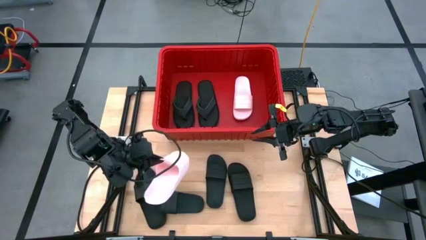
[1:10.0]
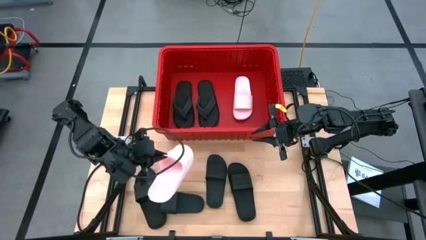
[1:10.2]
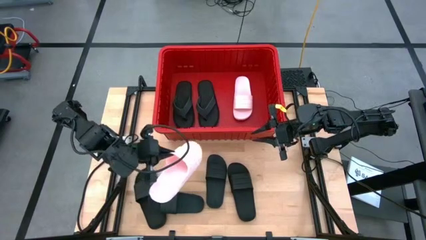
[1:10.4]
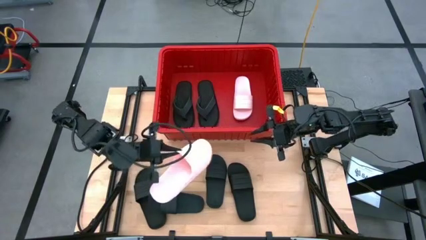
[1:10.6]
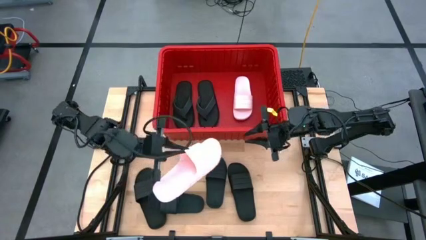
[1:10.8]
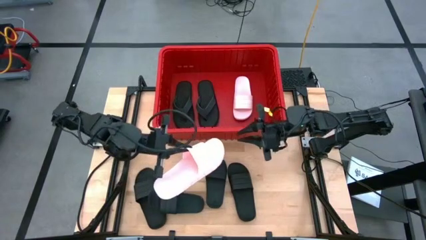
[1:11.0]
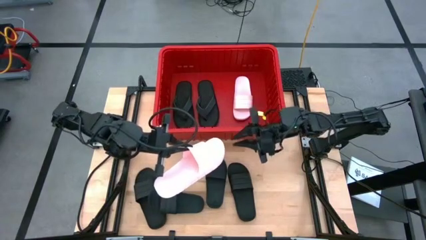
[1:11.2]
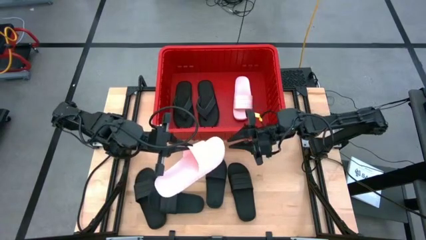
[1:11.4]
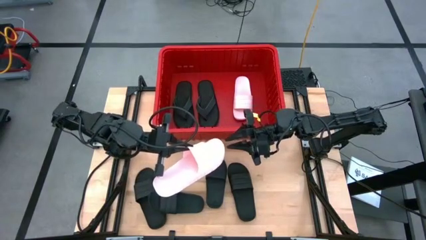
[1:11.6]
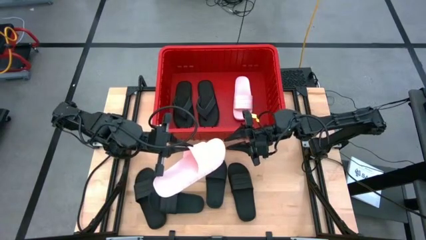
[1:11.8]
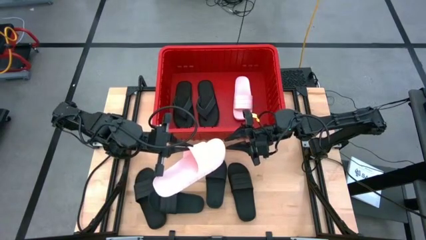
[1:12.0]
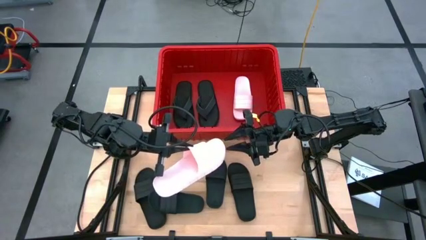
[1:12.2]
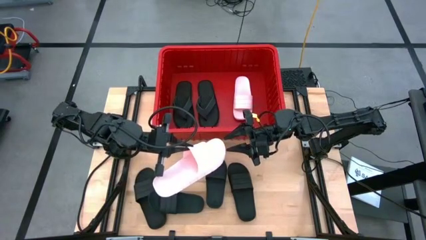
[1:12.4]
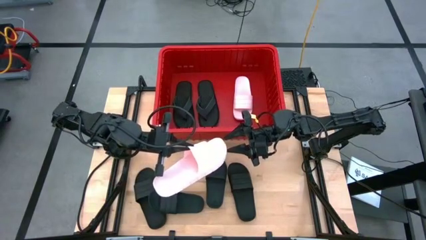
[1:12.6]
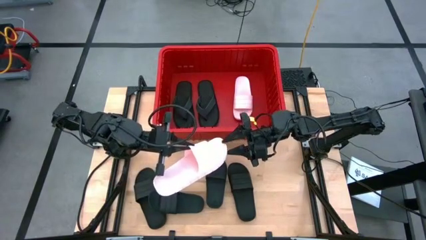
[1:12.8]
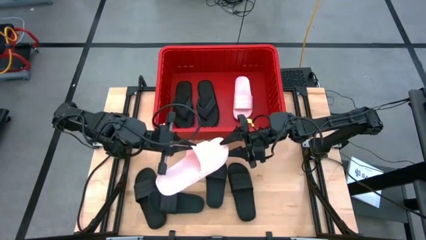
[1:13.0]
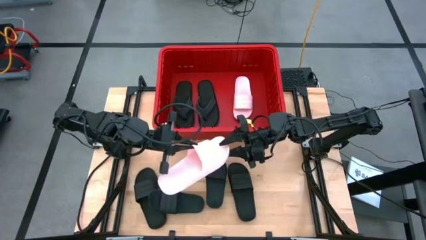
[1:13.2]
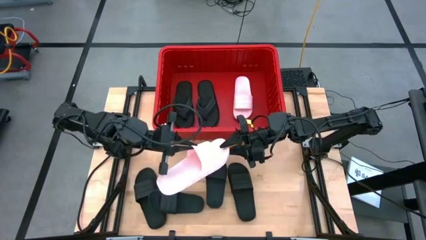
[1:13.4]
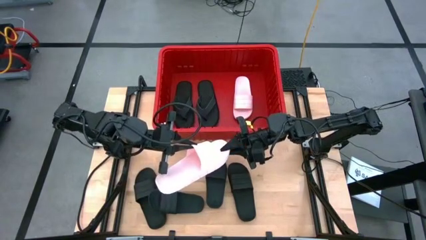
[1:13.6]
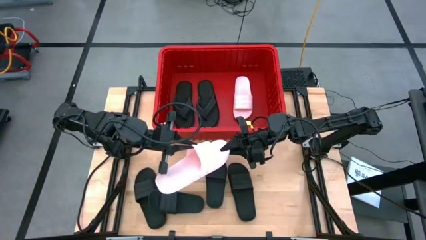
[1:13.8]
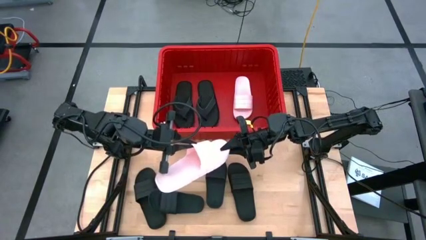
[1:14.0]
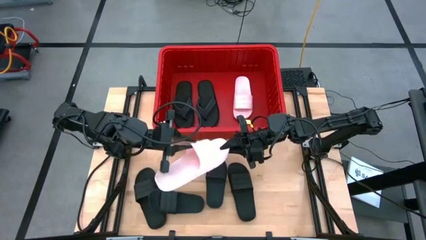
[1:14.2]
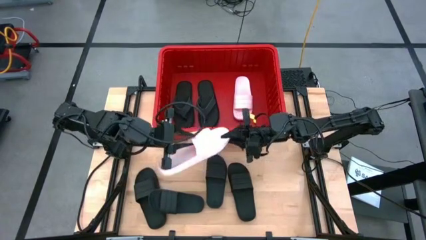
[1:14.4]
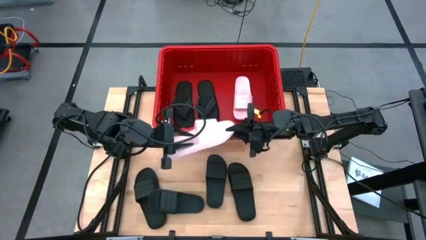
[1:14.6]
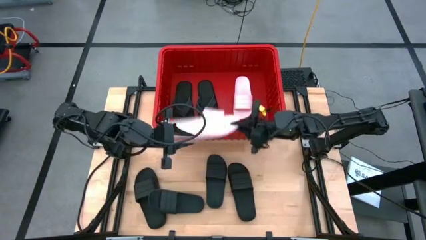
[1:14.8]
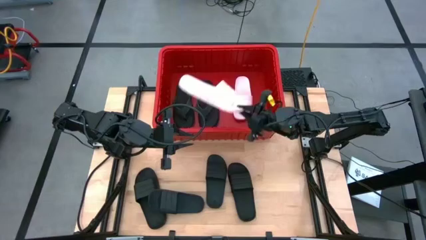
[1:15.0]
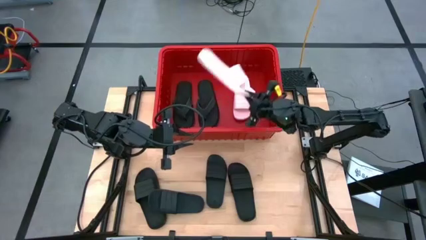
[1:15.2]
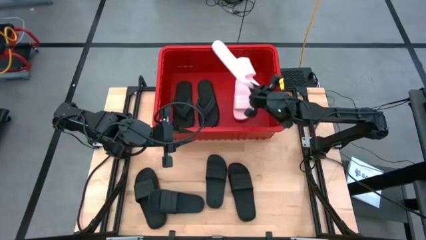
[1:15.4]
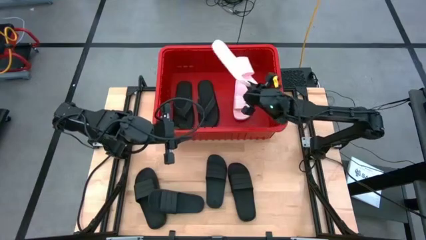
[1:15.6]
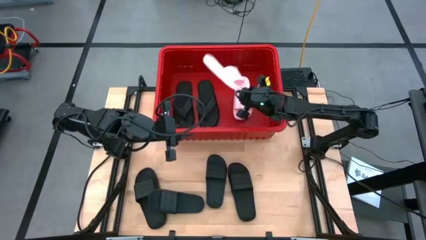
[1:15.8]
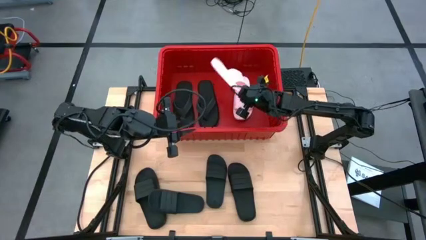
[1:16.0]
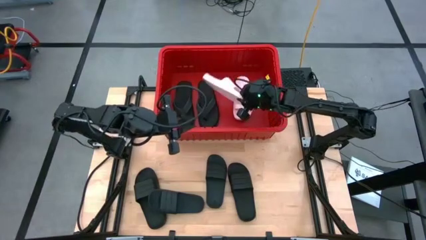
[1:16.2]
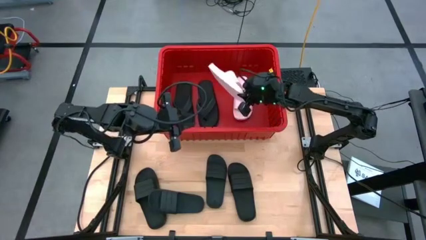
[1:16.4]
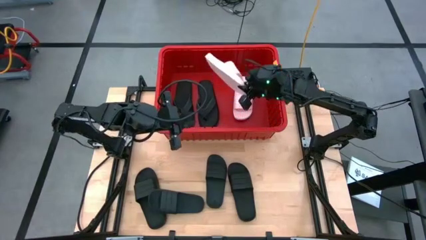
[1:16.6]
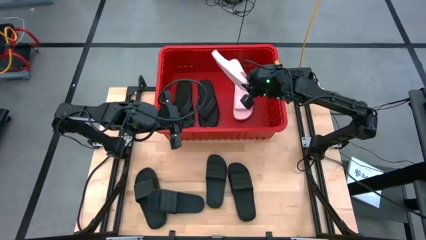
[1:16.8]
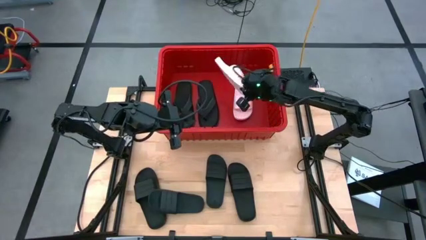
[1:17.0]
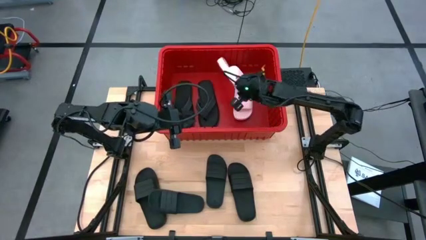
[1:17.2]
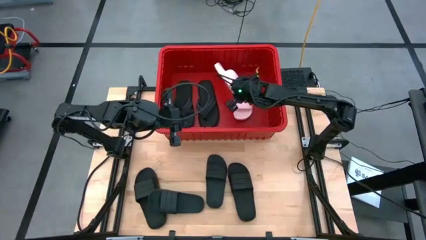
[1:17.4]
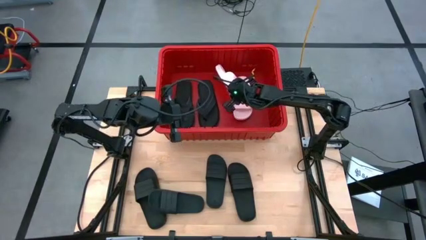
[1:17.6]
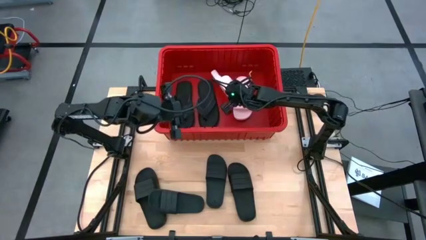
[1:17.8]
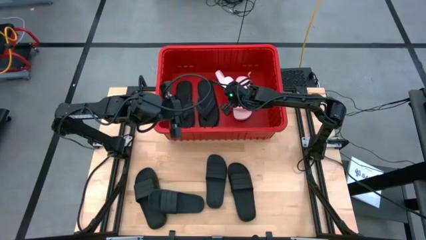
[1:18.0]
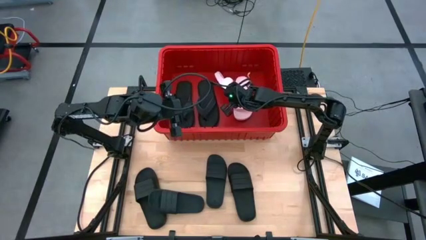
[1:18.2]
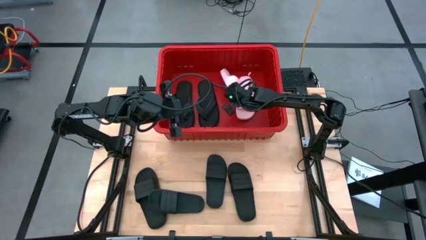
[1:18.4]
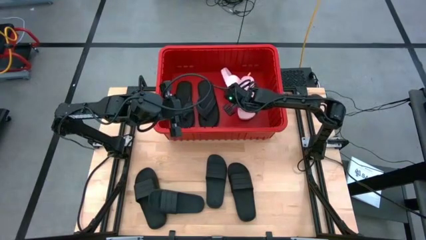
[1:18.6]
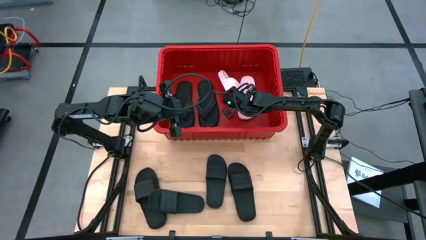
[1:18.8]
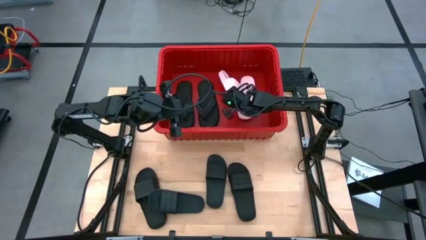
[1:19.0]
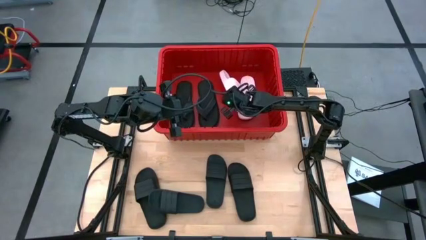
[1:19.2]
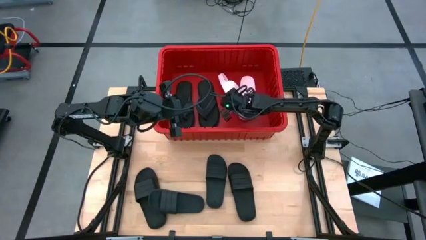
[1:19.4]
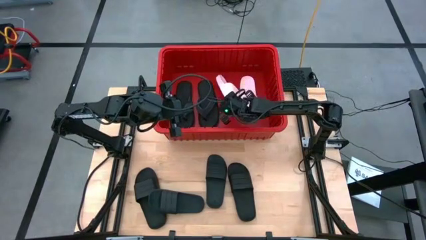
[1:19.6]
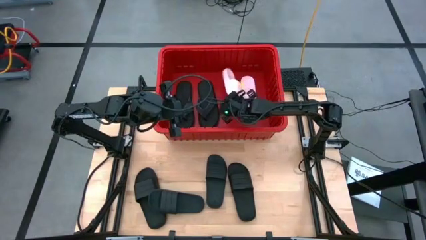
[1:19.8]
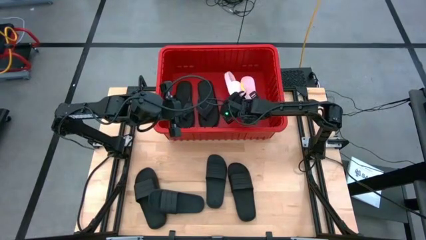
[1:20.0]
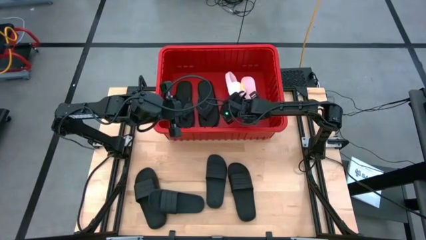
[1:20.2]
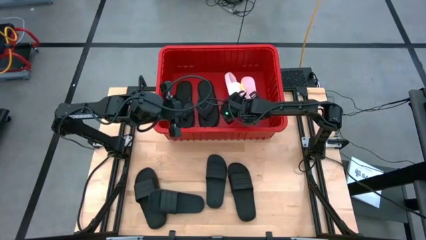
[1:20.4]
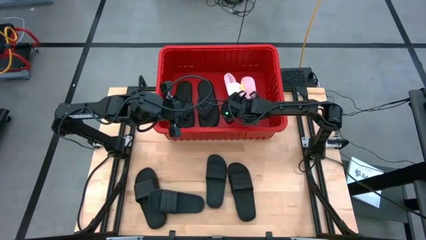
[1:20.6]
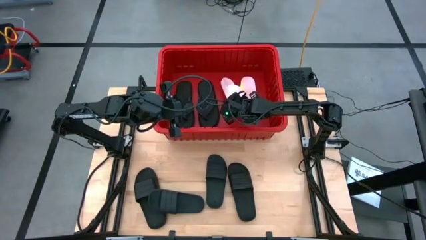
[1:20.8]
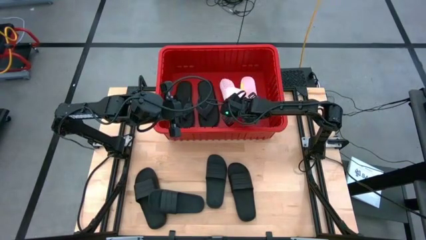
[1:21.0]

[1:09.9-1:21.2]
Task: Pick and place slides into bin
Put the pink slide into the red bin

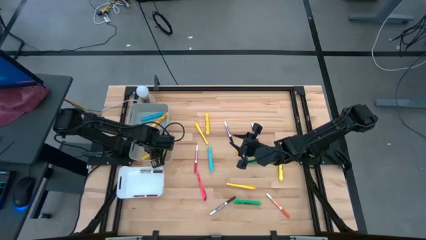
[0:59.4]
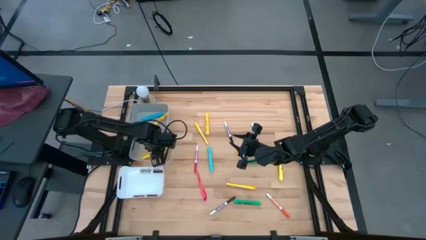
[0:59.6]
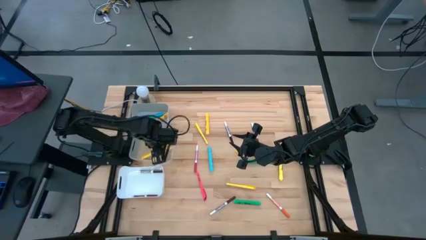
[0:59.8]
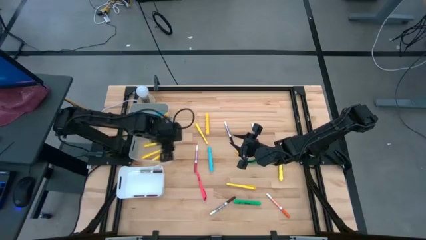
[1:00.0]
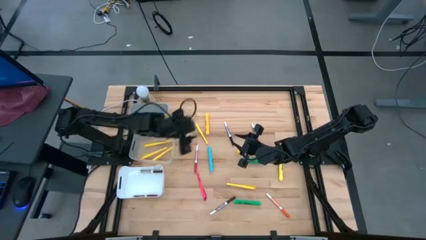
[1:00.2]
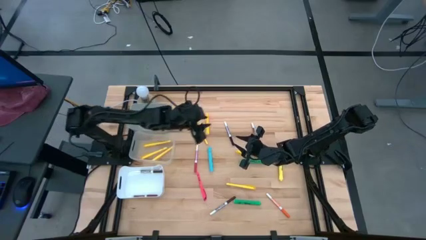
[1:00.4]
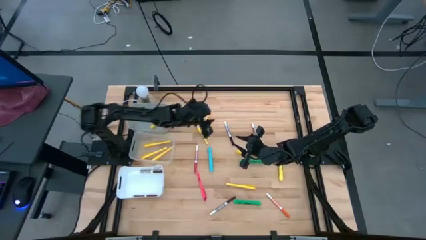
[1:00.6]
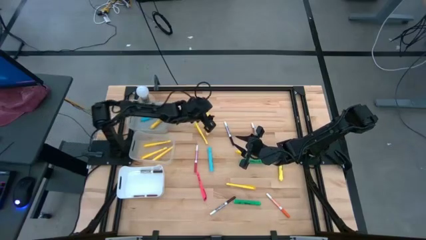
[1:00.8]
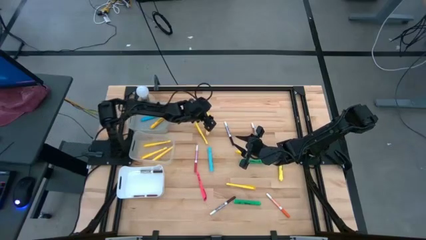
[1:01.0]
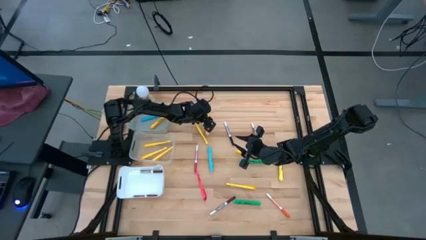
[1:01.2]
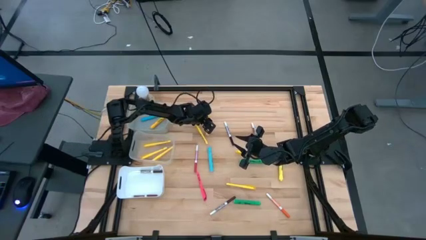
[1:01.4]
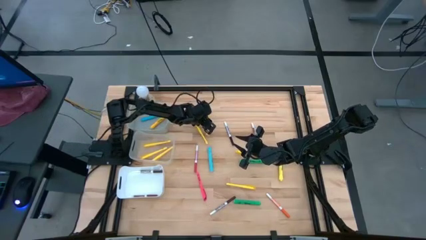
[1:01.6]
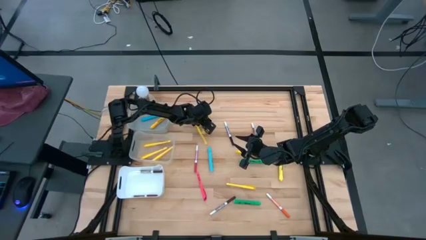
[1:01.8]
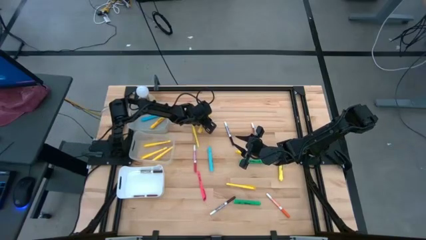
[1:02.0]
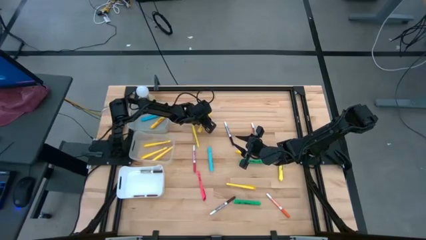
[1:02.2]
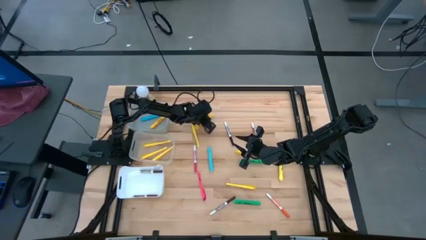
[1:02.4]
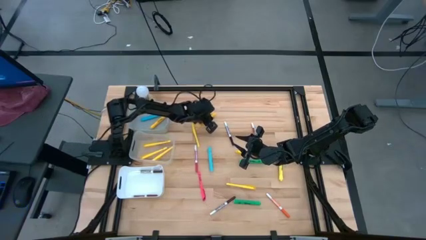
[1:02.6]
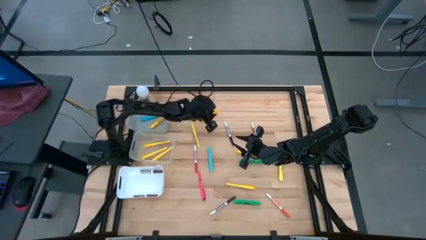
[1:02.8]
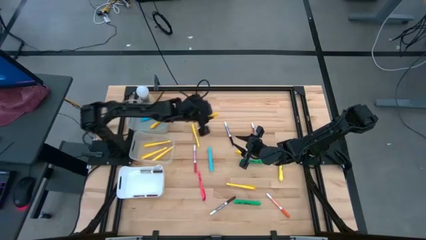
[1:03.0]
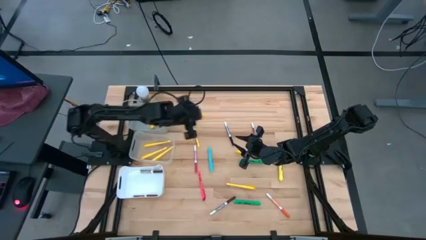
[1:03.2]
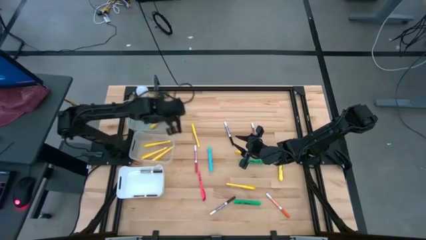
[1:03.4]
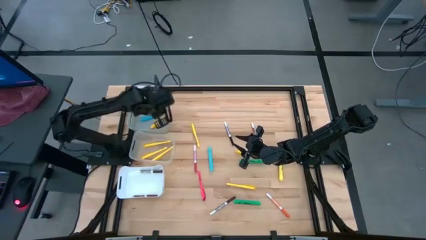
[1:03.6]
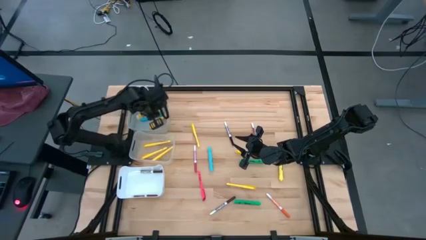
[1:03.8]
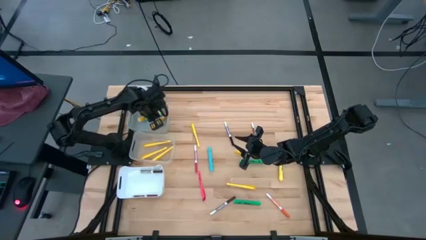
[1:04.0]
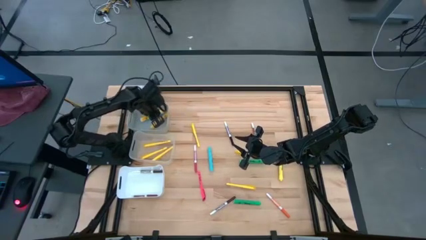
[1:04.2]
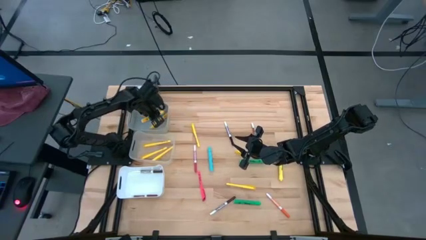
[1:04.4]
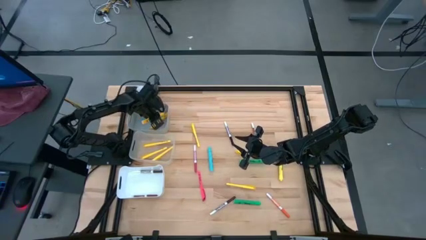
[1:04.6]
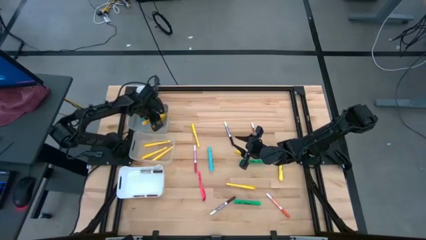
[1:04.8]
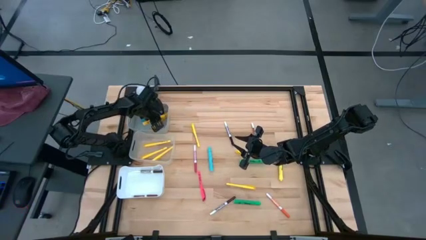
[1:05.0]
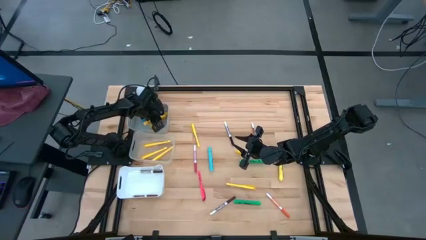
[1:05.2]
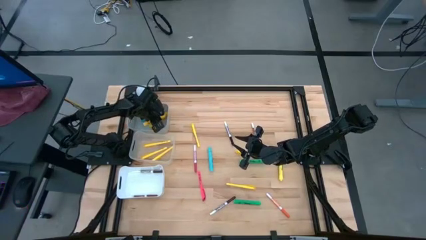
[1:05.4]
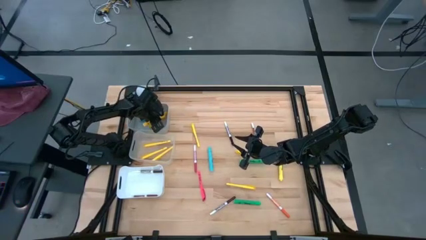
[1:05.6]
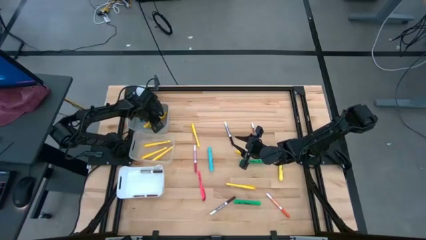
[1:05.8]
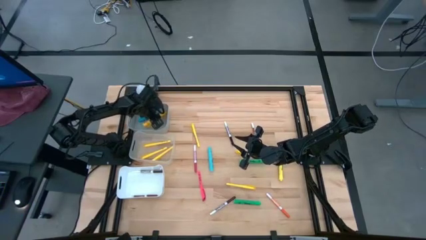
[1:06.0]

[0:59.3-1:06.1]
Task: Pick & Place Markers
Put the yellow highlighter into the gray bin
